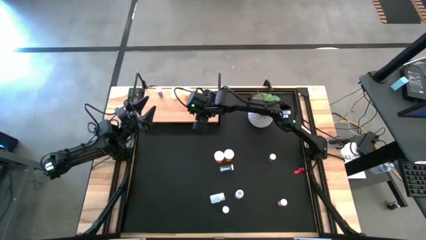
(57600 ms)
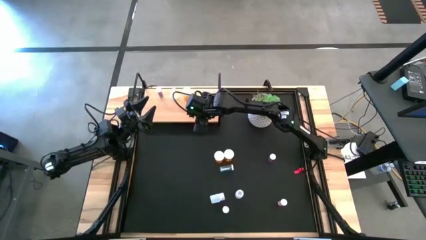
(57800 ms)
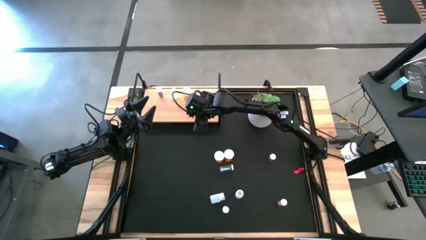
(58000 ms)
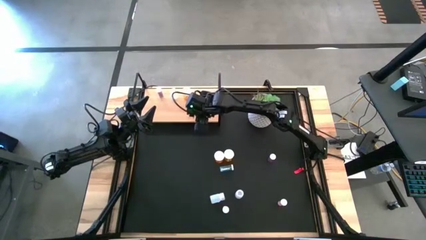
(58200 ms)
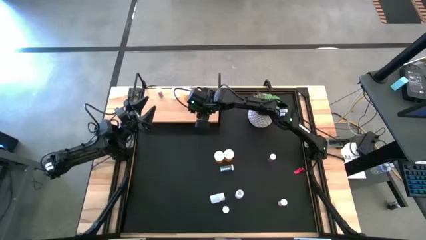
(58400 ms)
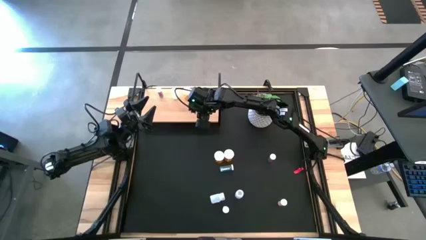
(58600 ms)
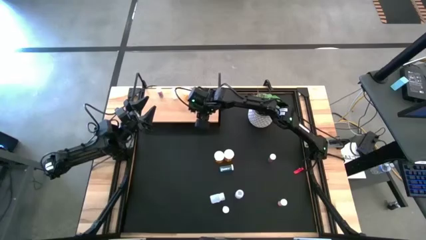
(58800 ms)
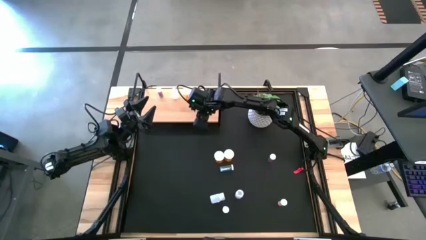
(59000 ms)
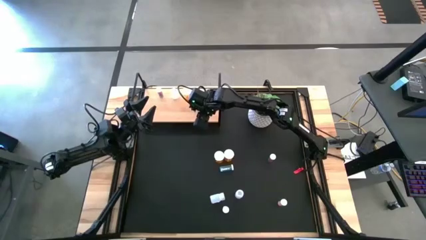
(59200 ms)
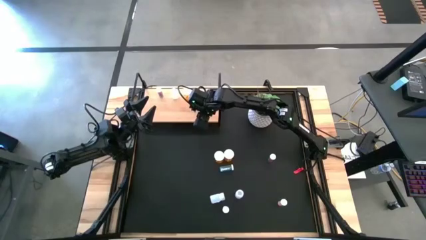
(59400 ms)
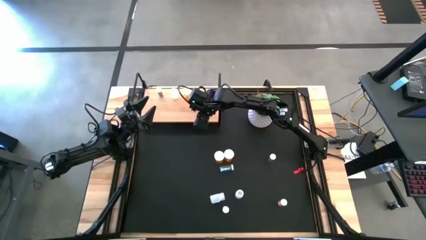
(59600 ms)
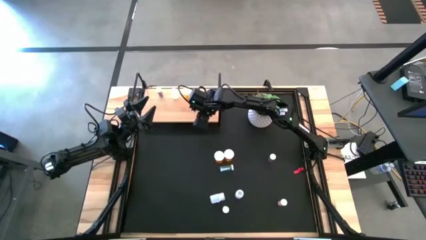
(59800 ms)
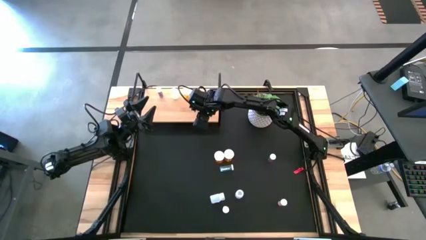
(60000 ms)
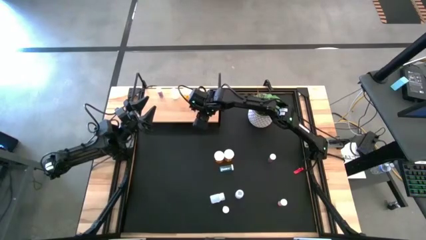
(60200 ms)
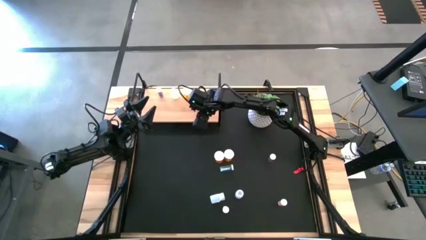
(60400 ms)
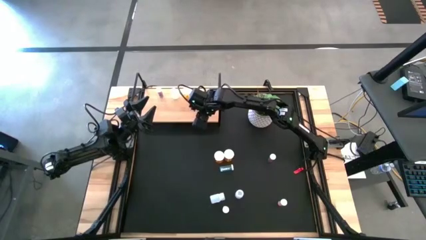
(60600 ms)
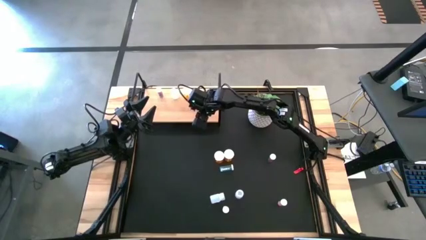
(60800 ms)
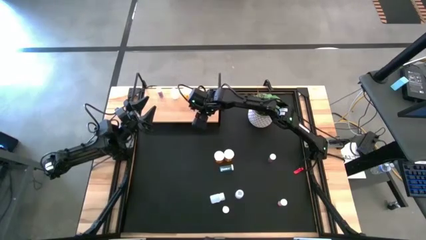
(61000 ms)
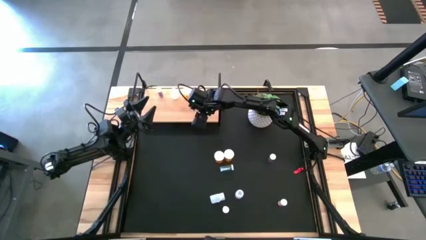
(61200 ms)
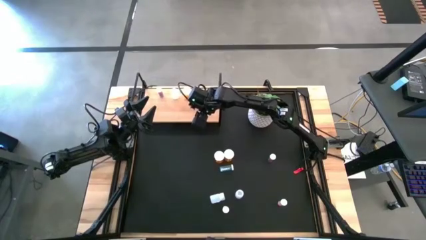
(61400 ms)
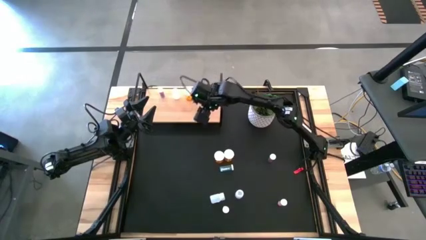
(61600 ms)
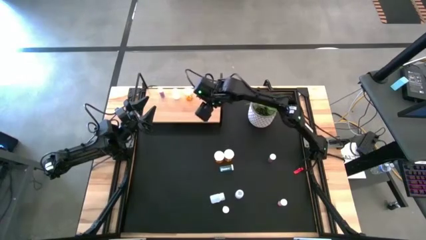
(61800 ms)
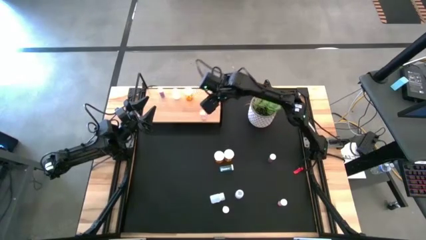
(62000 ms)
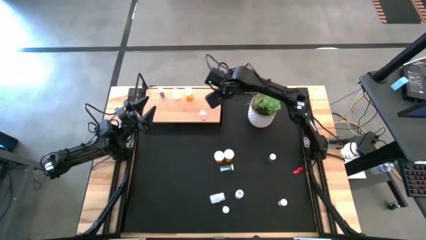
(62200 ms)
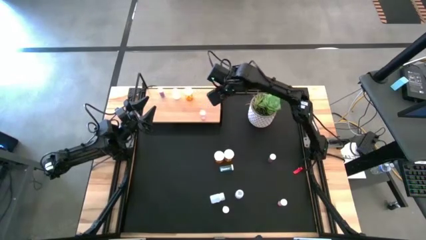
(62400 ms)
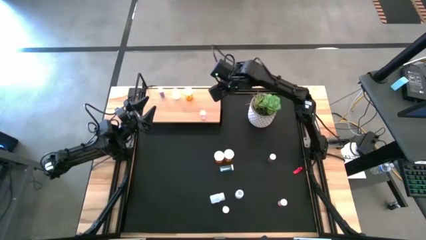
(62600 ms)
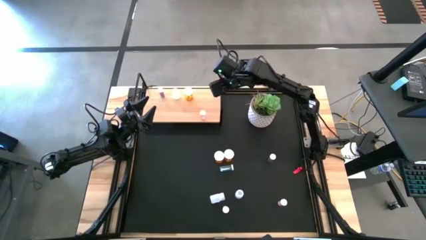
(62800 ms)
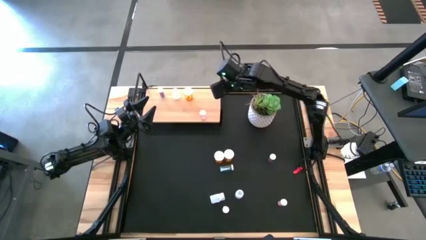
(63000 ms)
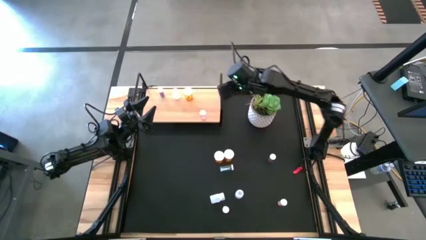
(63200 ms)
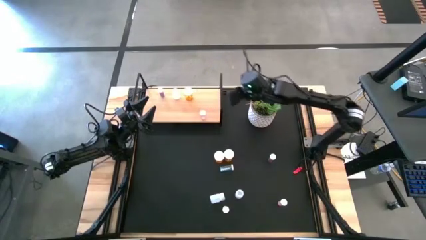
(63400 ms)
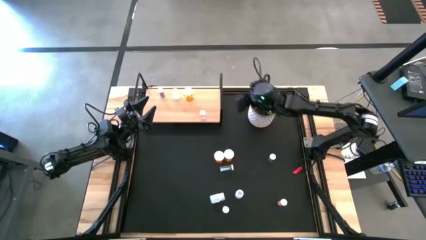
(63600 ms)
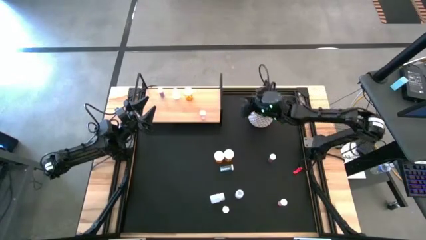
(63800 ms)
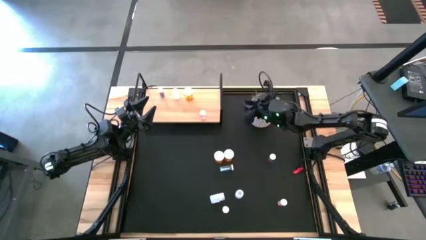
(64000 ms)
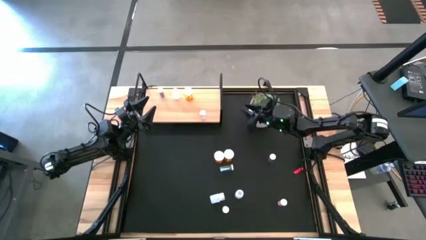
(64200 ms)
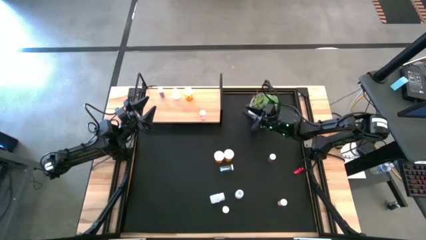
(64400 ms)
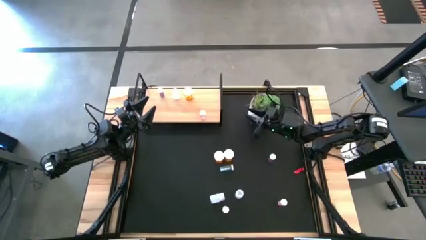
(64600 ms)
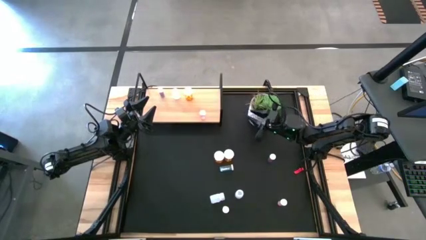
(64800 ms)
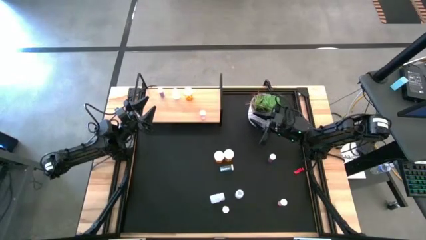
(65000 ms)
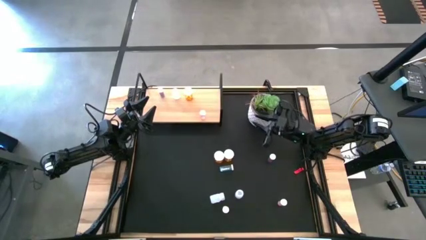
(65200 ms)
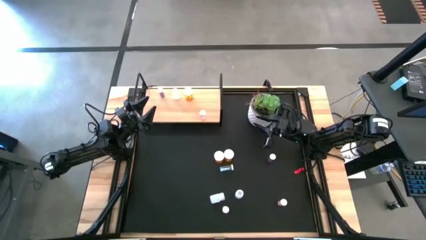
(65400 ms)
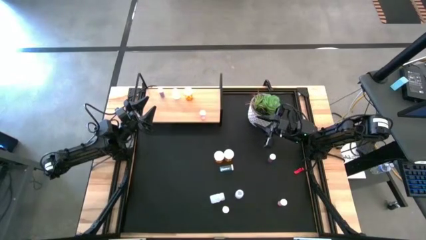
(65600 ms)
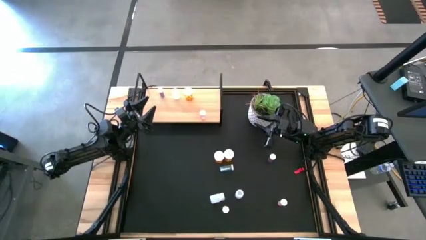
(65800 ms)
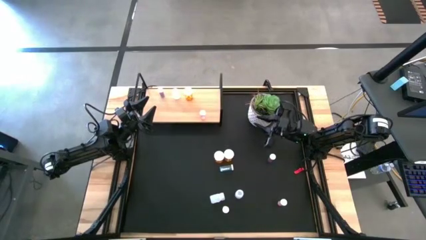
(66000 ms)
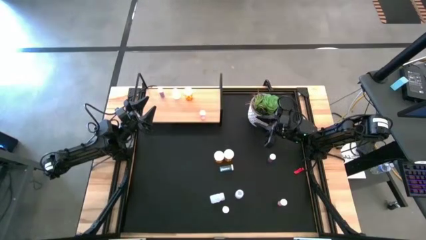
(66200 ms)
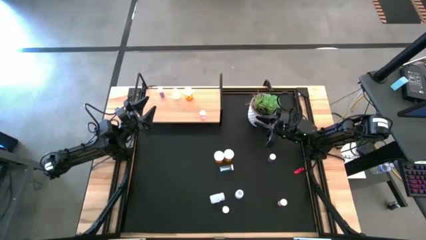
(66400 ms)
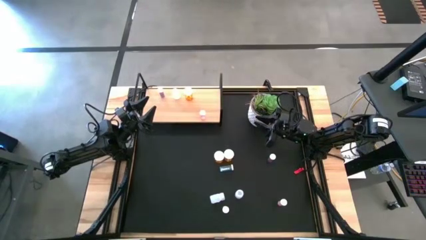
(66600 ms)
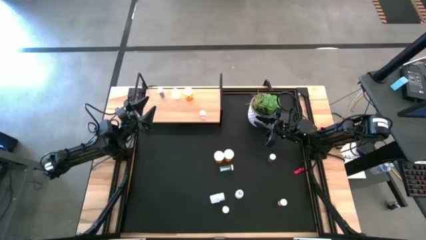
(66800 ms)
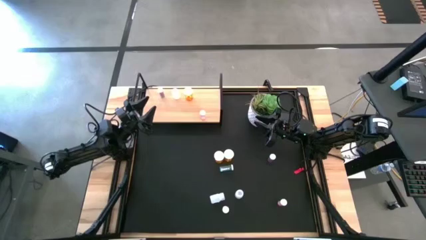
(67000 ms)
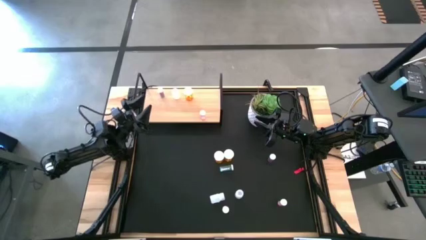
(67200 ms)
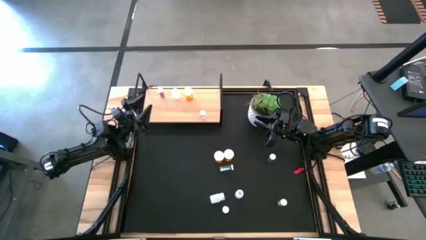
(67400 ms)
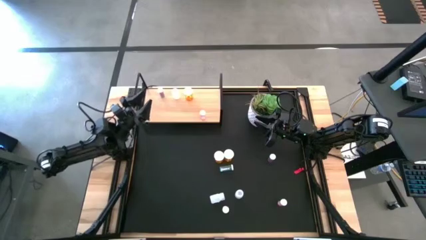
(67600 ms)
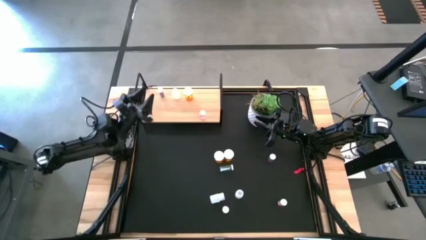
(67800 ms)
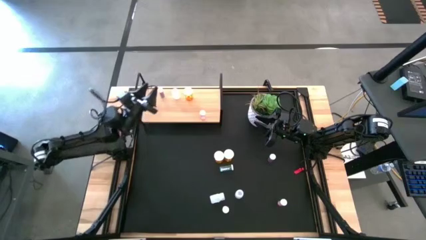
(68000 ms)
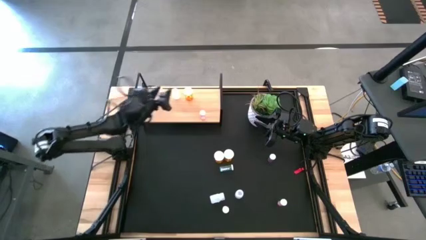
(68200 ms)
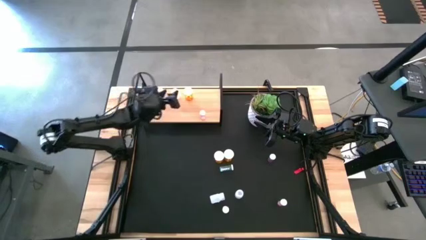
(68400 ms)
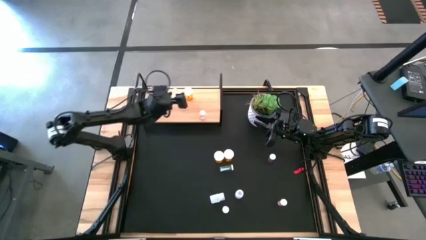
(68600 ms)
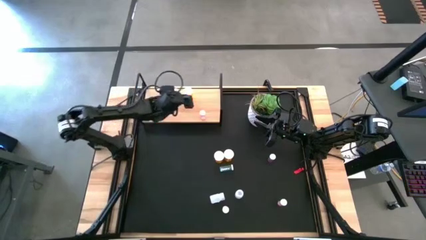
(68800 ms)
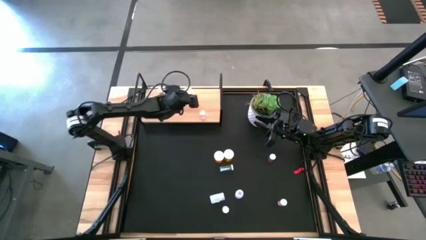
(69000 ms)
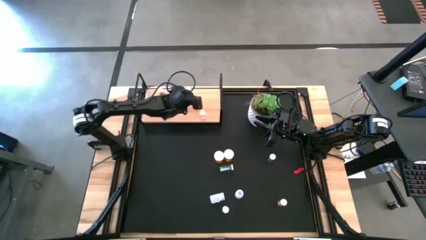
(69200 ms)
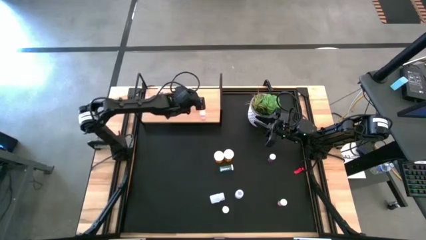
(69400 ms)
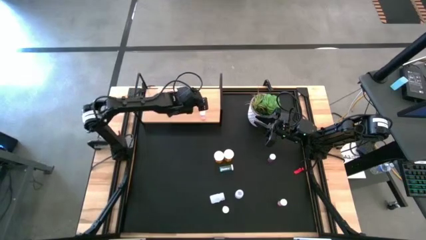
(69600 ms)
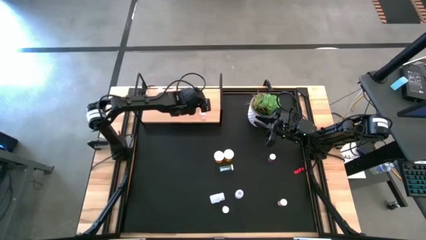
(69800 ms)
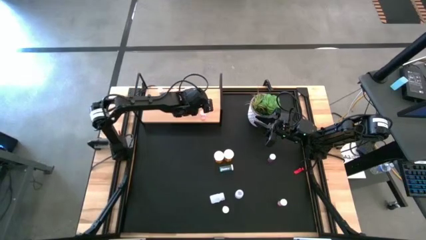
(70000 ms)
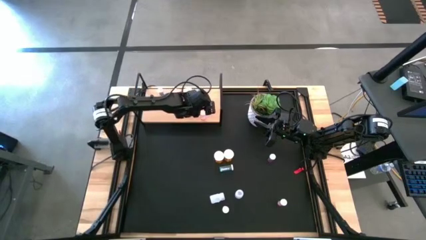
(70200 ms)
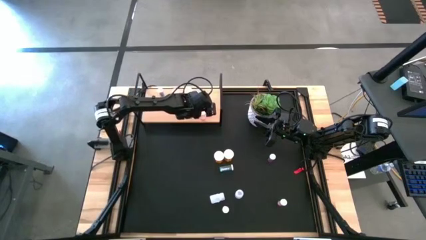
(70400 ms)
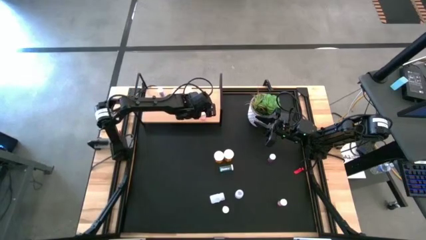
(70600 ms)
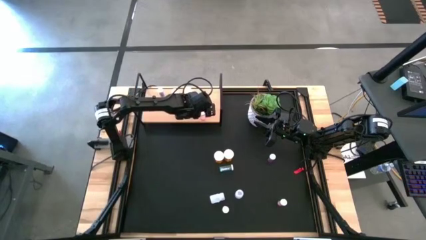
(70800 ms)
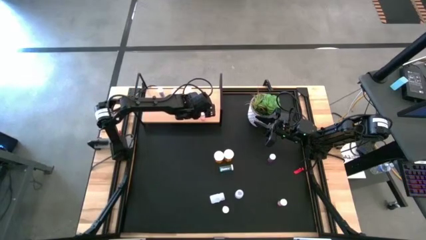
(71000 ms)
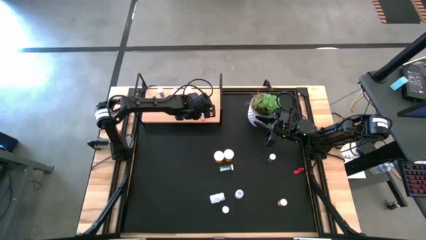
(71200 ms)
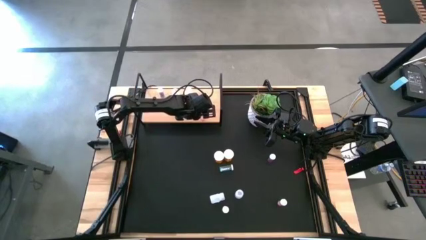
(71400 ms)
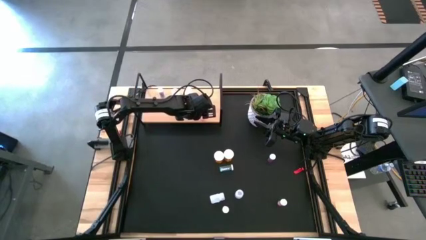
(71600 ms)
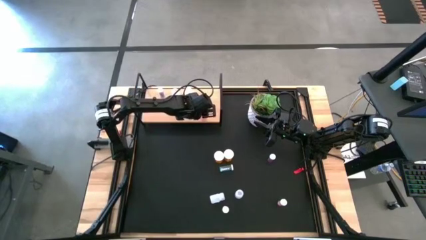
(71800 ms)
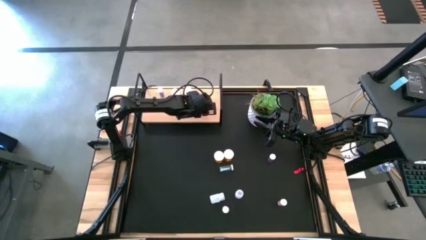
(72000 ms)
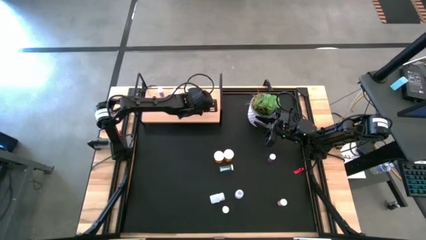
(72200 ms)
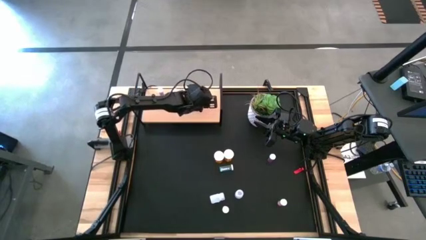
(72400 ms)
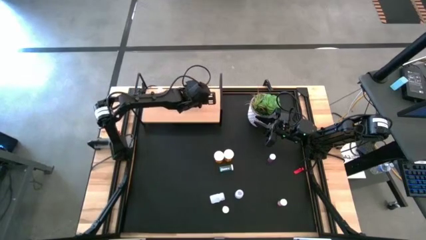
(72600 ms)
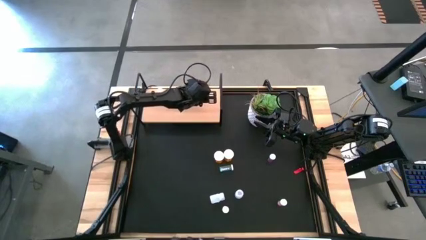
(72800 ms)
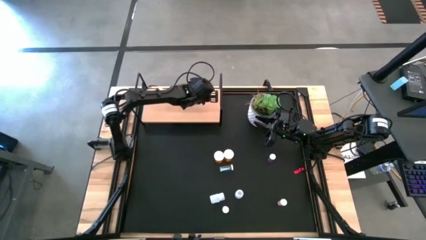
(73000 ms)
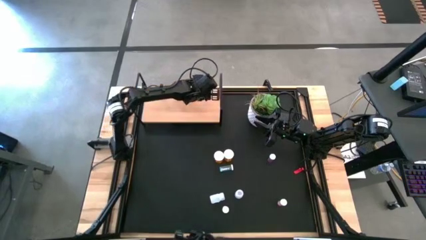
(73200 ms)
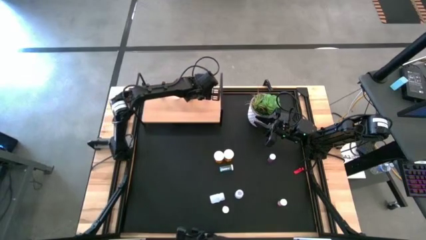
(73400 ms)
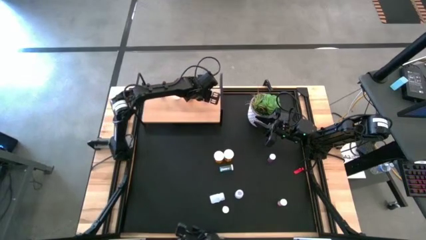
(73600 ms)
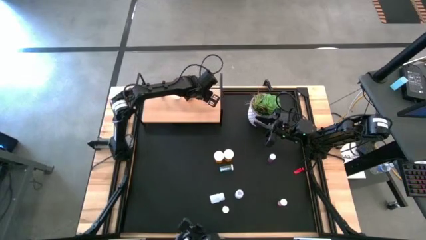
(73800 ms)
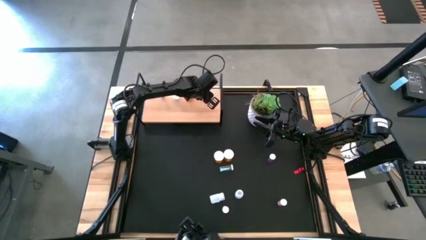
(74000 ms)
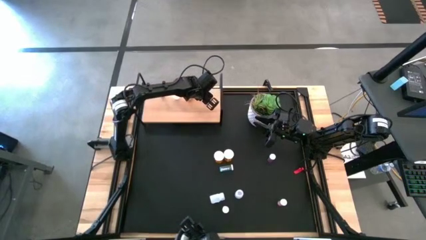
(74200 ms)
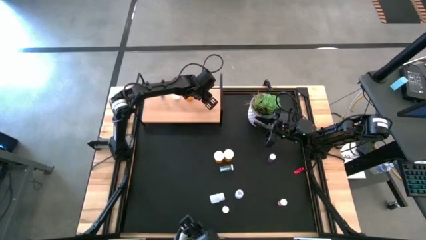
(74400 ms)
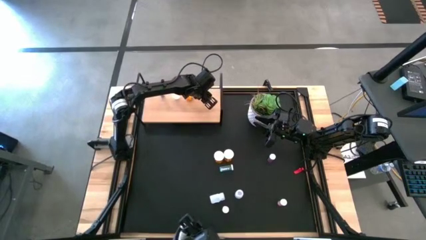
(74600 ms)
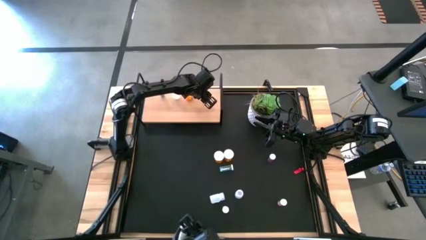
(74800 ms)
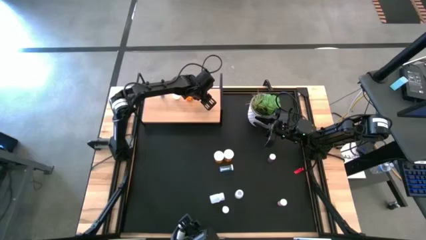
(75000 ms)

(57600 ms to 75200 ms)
Task: Pick and place medicine bottles onto shelf by color
Put the top pink pill bottle on the shelf
